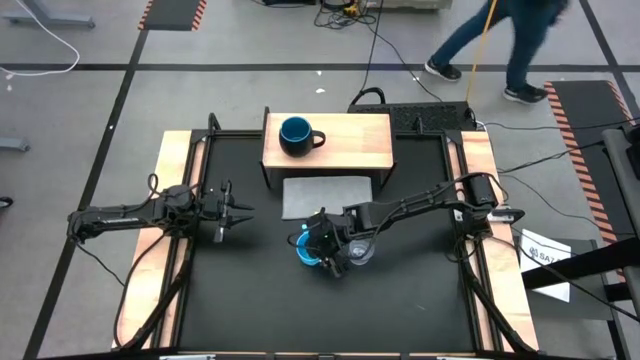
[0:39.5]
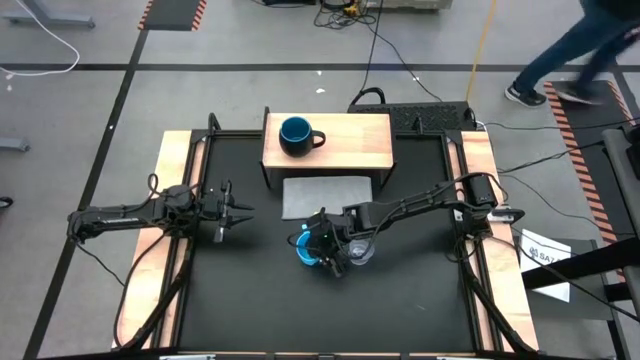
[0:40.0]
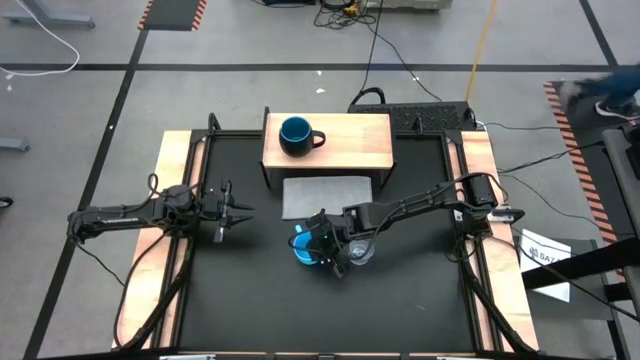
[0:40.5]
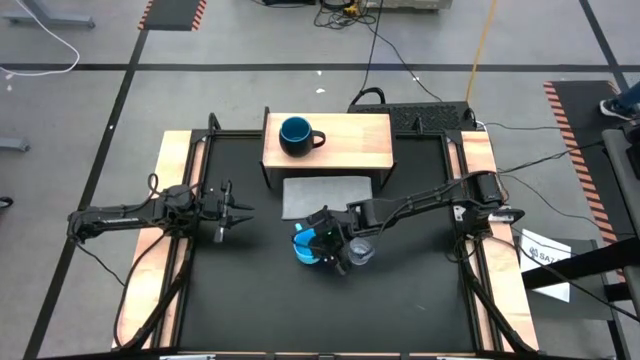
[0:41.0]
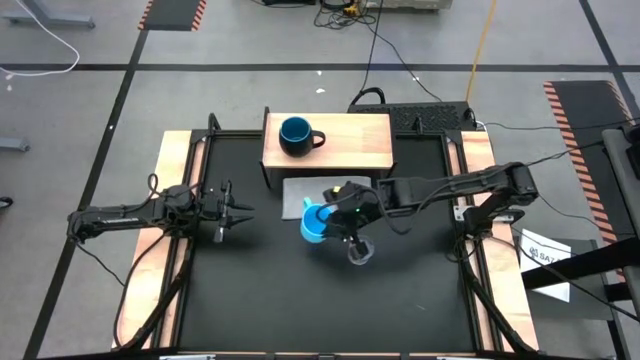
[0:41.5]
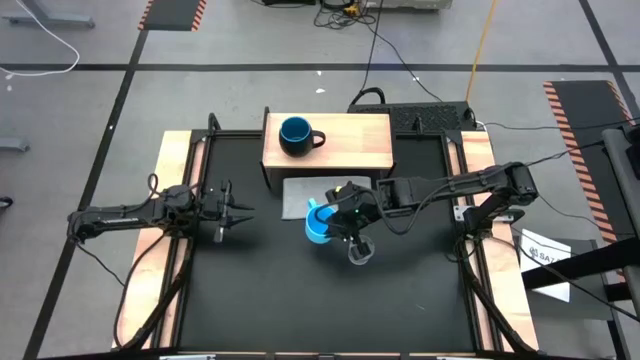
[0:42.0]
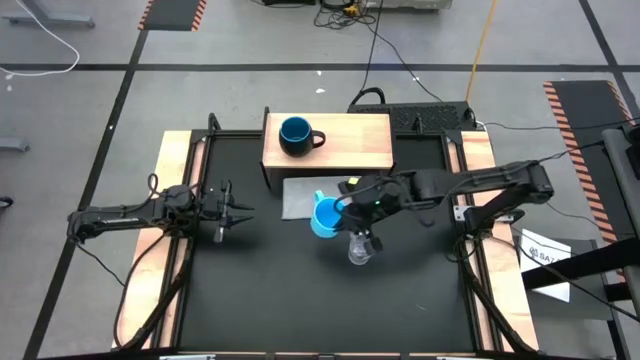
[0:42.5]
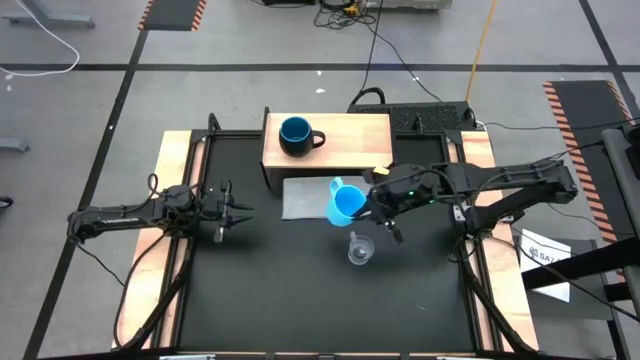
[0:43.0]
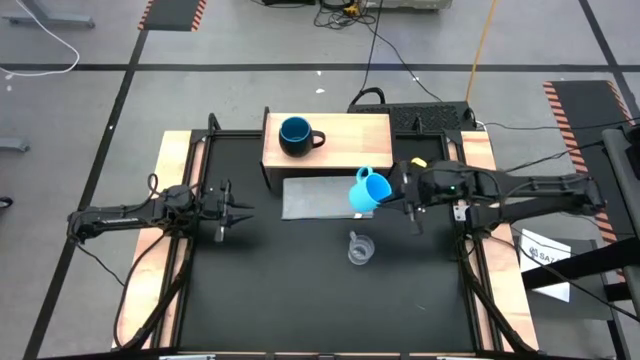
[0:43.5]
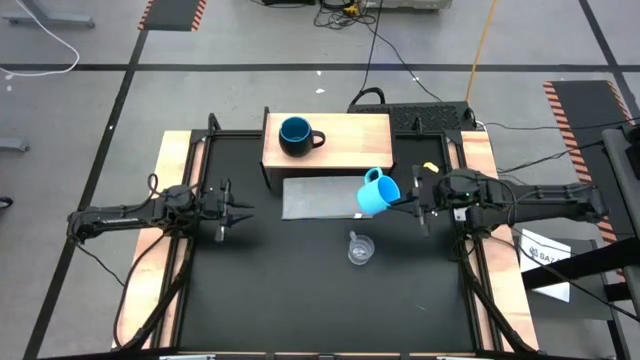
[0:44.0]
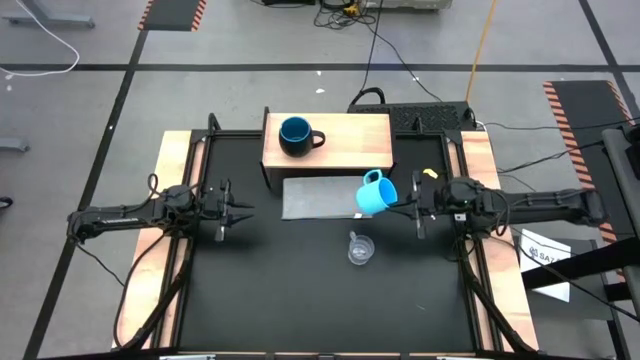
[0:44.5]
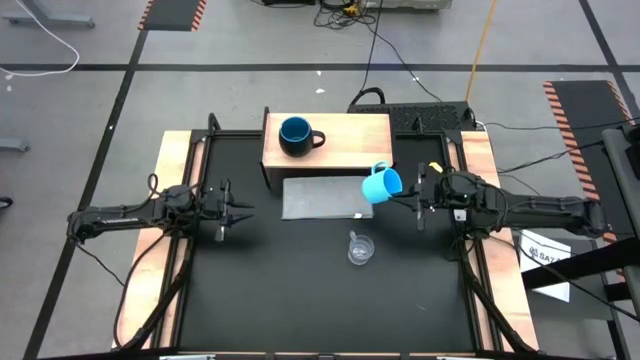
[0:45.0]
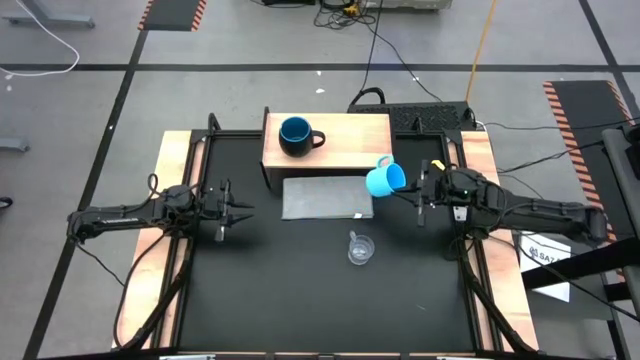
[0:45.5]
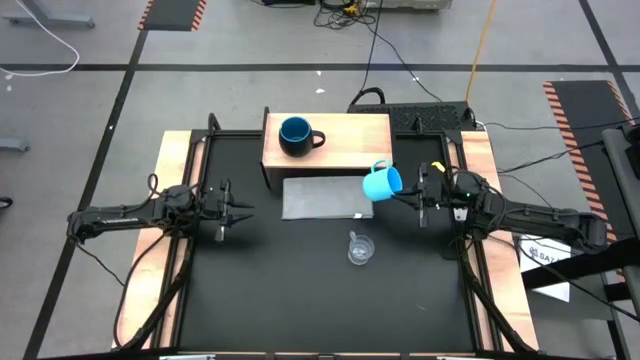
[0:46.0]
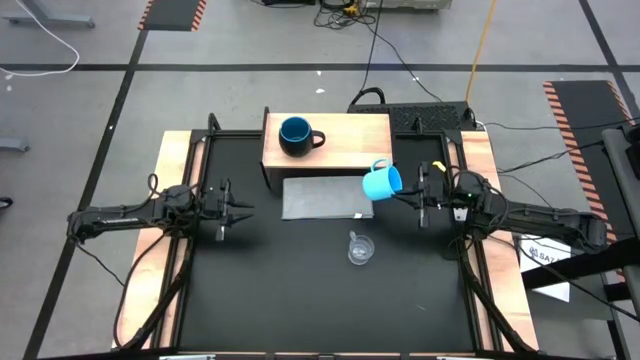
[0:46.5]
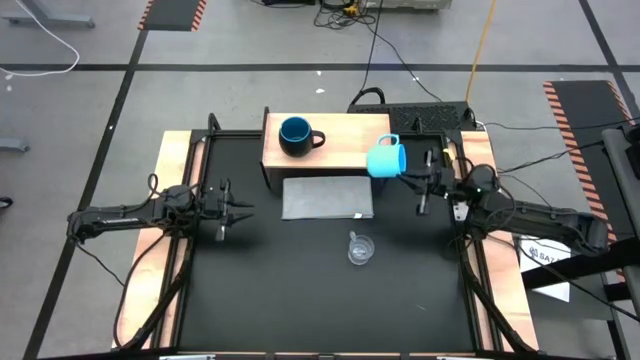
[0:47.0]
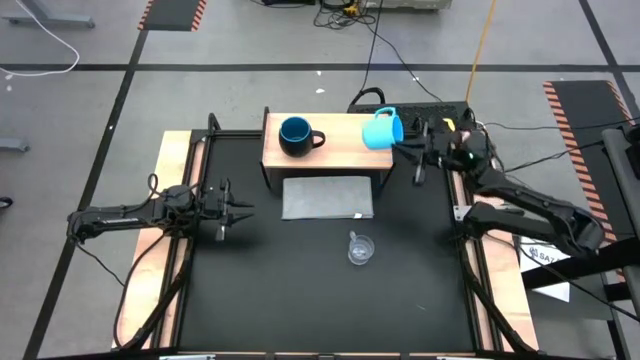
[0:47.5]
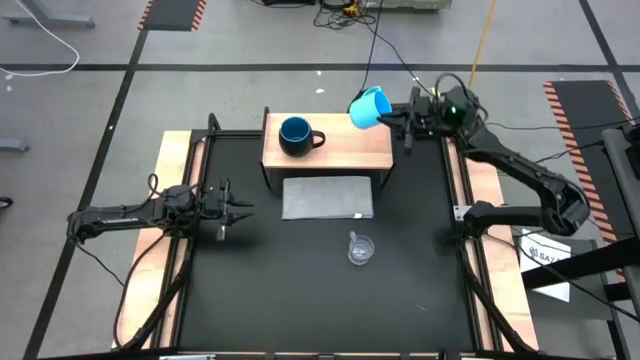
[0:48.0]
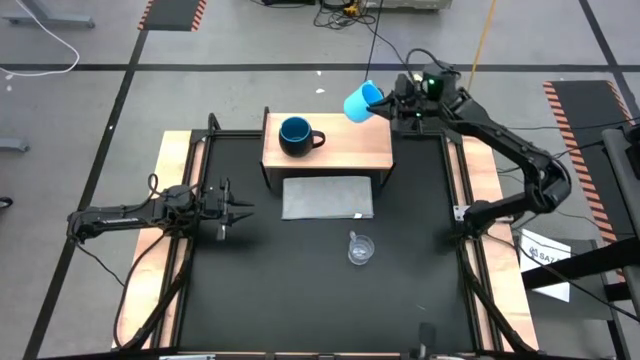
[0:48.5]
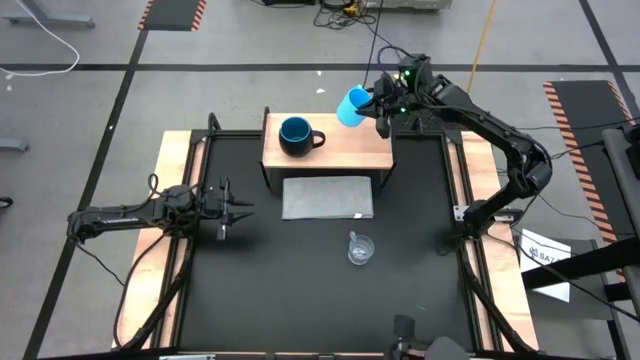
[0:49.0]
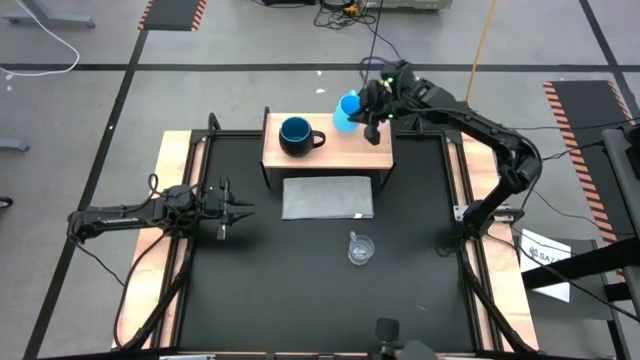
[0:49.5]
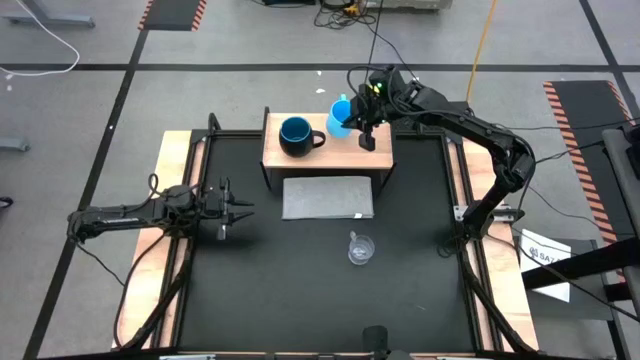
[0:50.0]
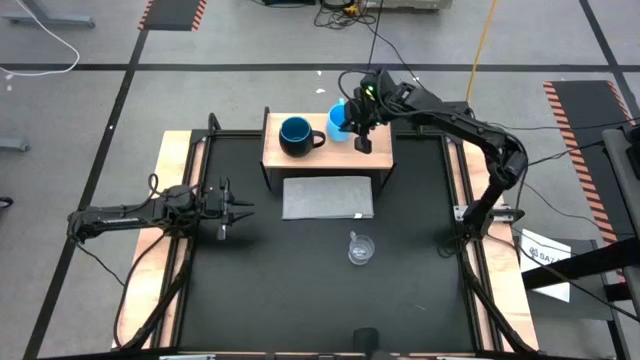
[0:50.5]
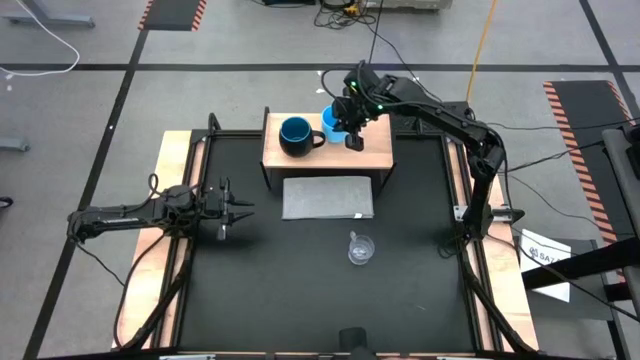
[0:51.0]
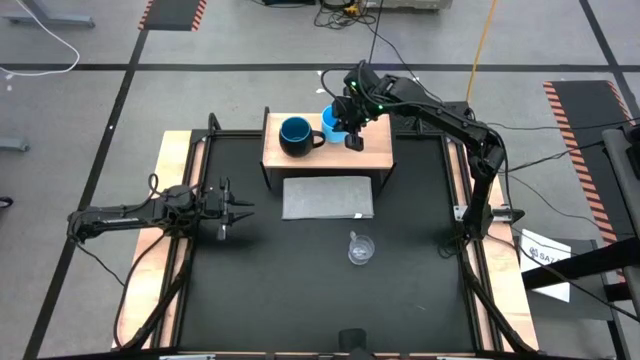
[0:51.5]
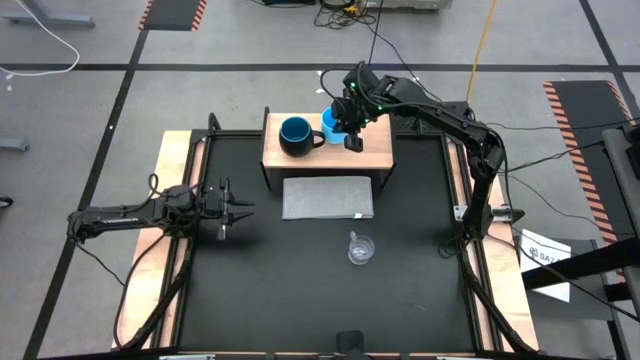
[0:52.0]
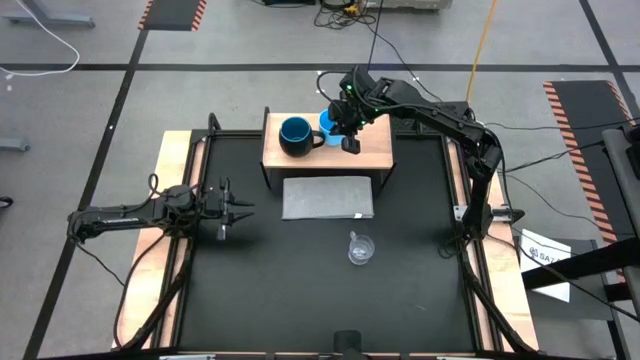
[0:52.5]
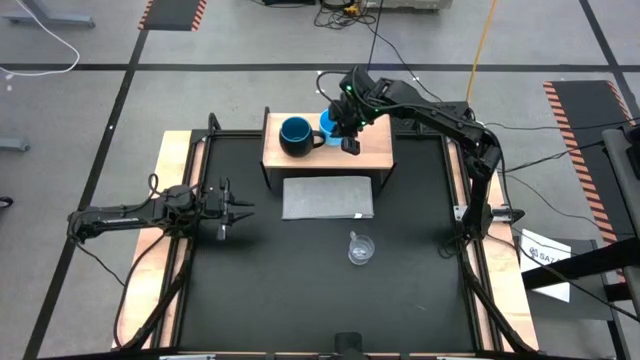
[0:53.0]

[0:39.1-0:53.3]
Task: Stack small to large cups/mugs on shelf
Put the blue mug on the shelf

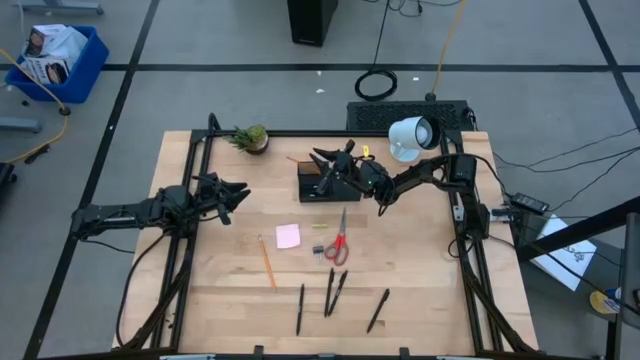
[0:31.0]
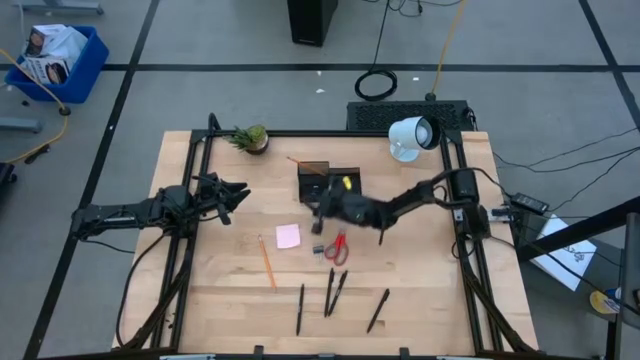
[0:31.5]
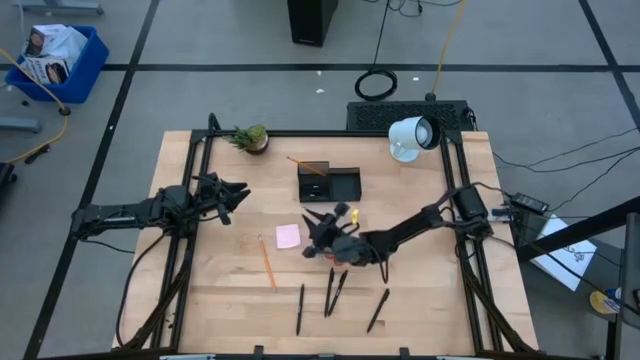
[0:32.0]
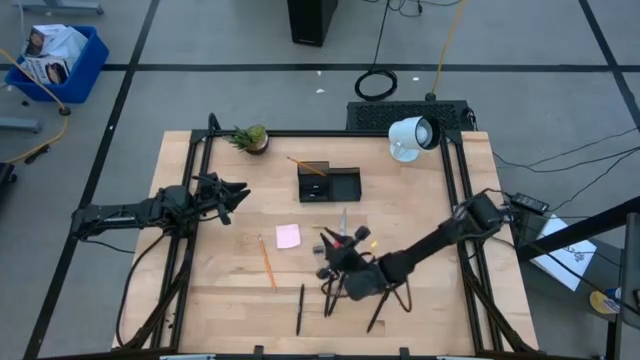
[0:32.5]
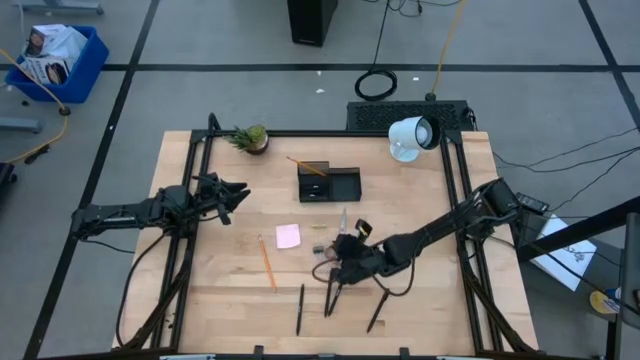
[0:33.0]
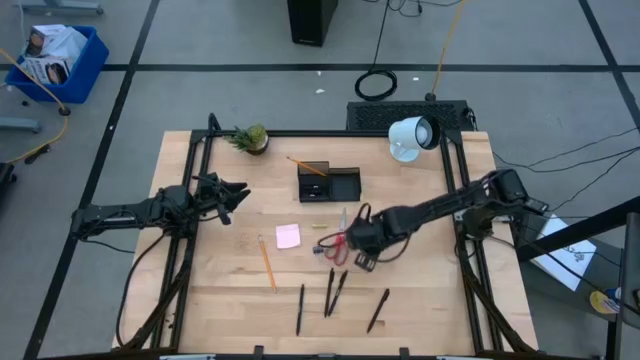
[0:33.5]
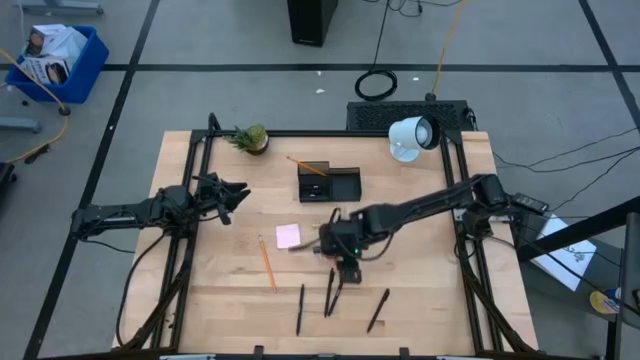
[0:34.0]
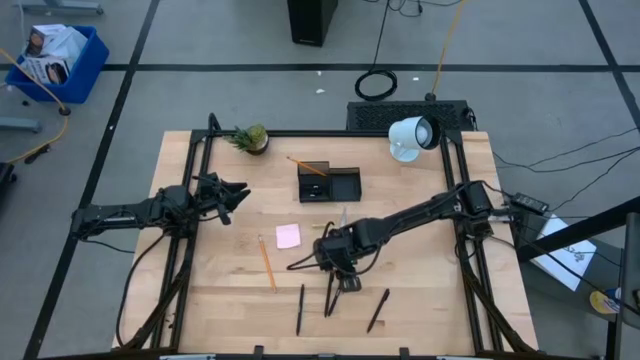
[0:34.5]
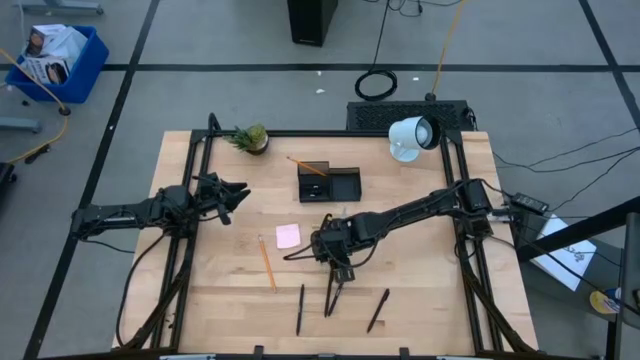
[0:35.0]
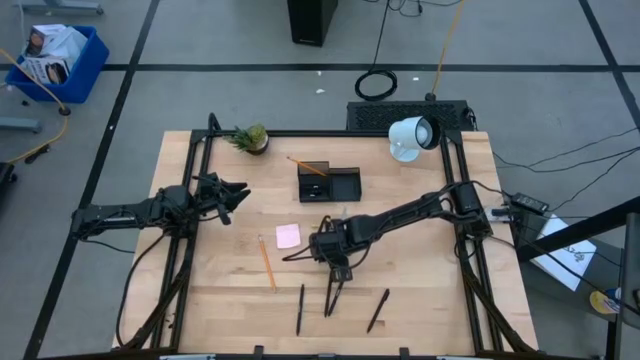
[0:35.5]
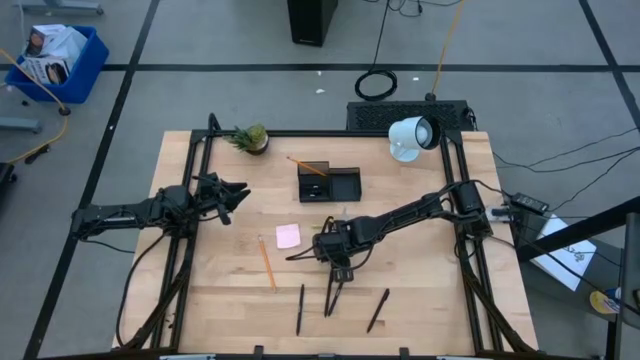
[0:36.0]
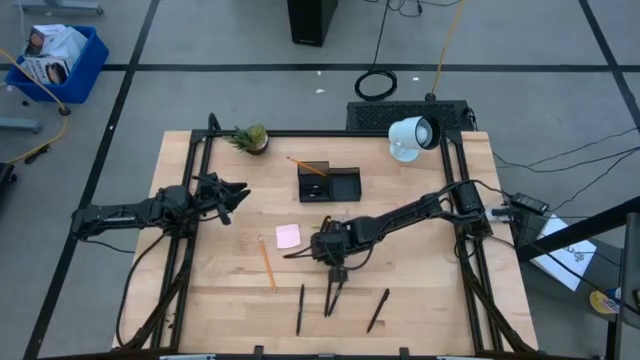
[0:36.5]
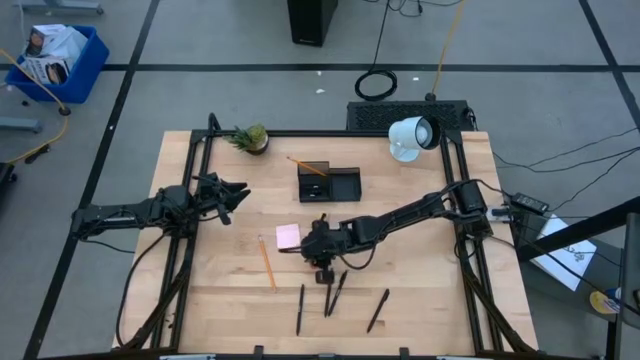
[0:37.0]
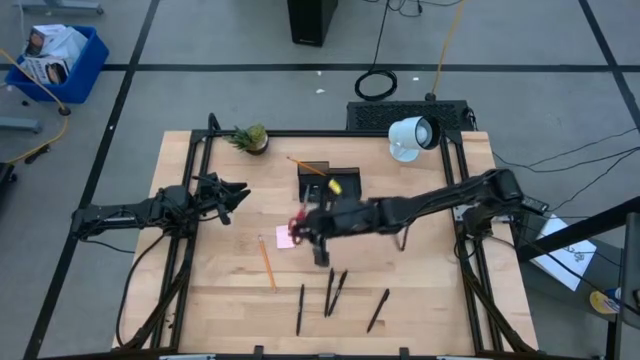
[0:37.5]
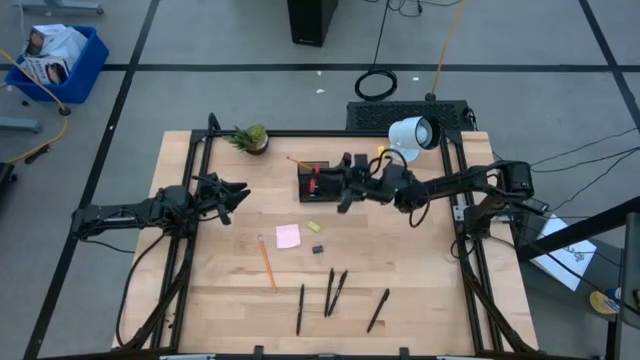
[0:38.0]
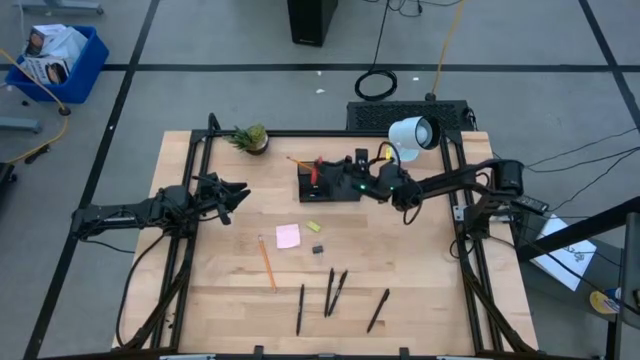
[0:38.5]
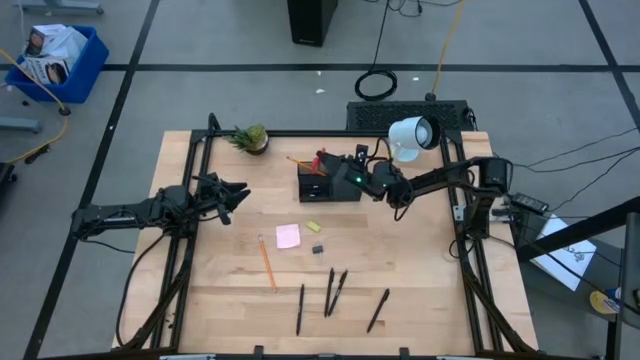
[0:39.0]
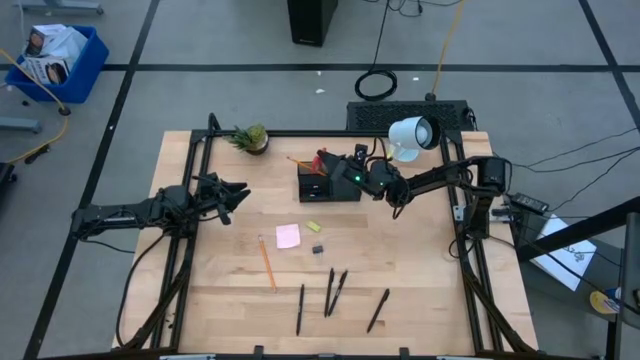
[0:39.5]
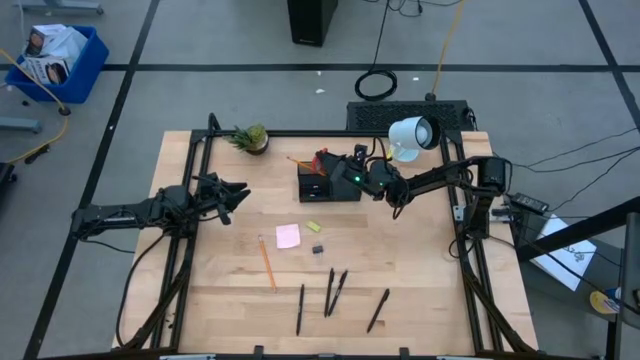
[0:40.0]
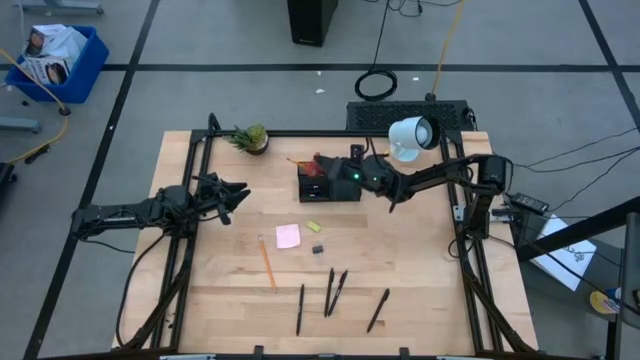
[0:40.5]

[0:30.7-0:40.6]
Task: Pick and place office supplies into organizer
Put the scissor into the mesh organizer
